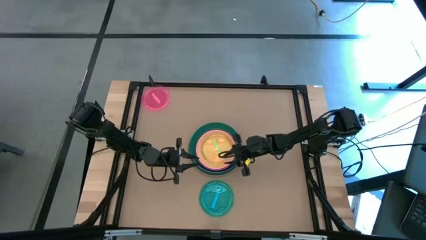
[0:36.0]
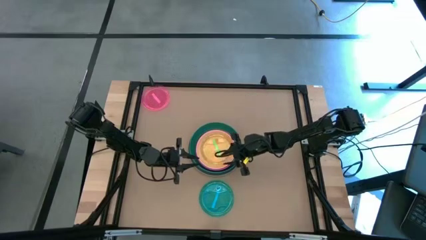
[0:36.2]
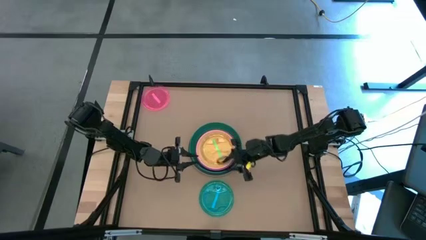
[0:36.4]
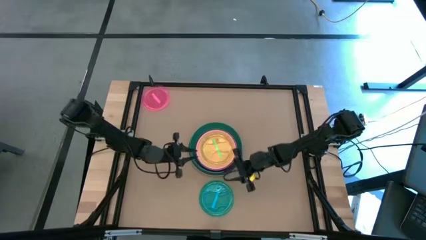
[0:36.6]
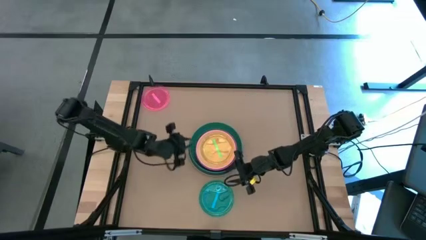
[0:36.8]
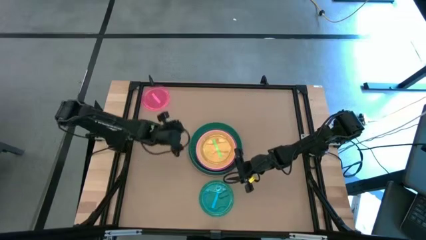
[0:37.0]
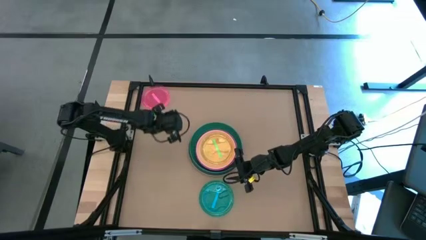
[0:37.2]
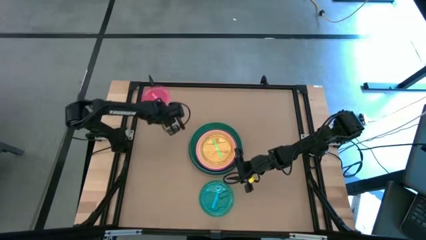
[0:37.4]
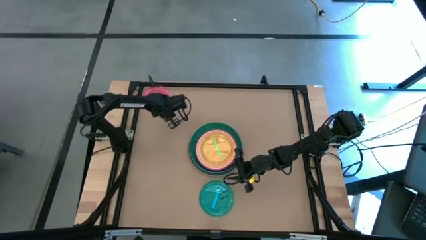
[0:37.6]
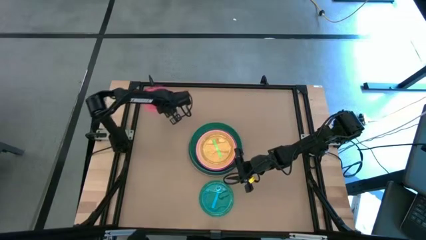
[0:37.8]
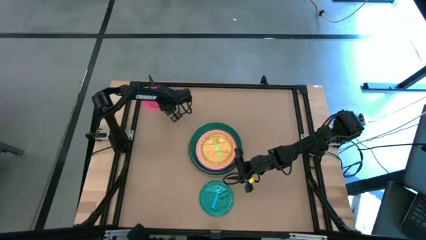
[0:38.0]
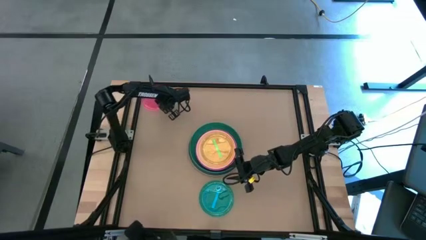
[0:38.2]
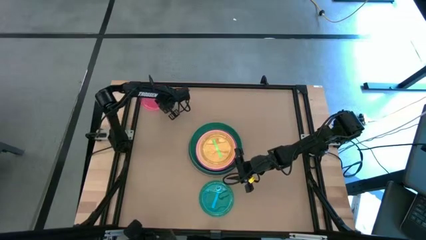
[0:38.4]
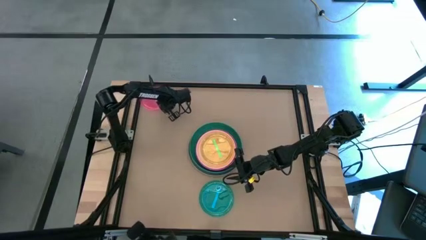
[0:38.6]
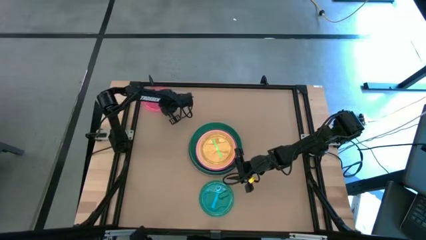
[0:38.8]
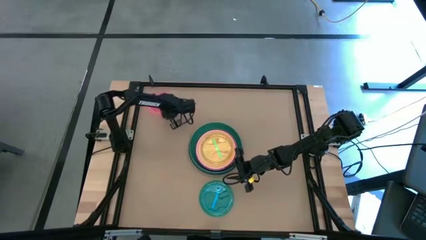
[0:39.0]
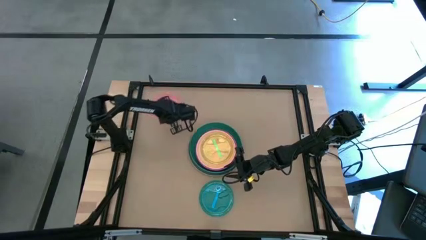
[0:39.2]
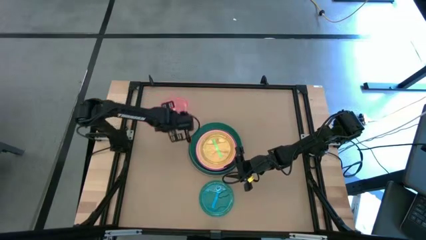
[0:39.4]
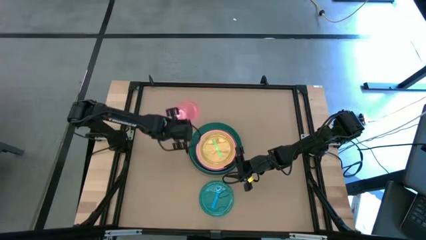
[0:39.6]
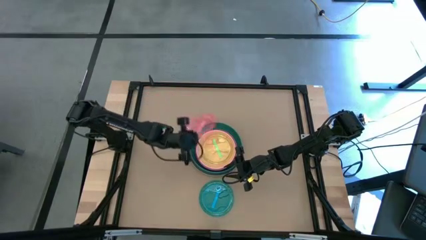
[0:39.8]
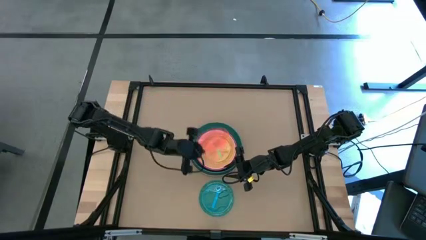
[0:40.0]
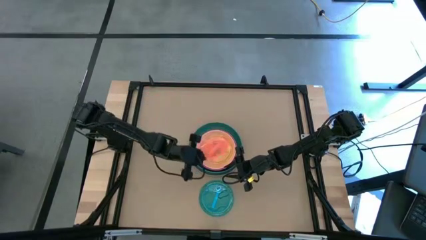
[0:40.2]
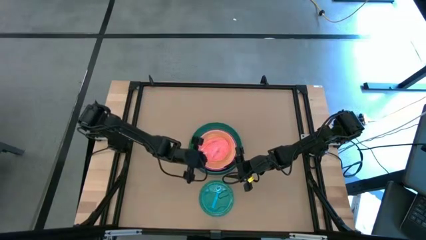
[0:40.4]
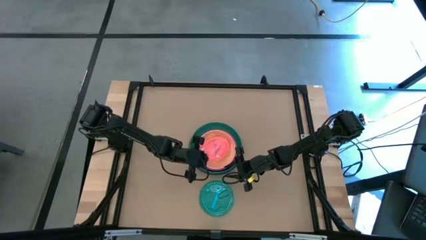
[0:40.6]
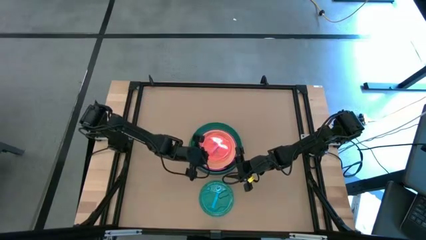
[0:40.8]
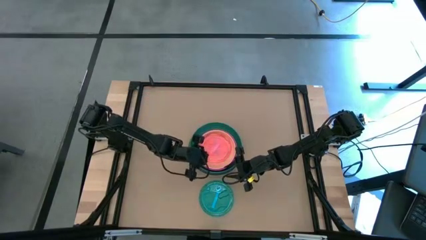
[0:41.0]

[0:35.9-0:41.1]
Task: Stack plastic plates
Stack the light pink plate on top of the green plate

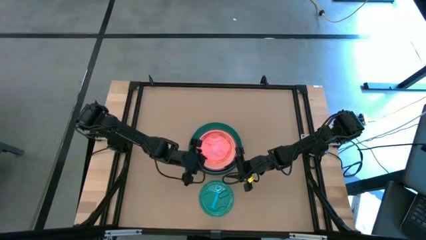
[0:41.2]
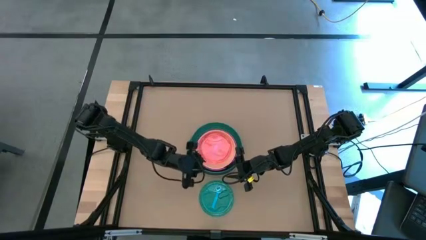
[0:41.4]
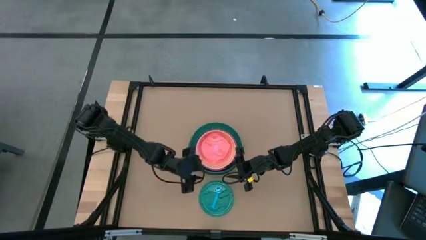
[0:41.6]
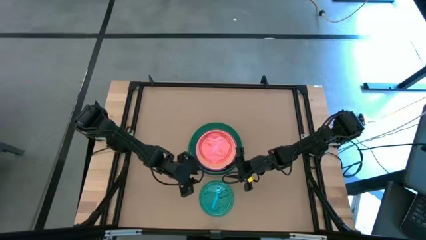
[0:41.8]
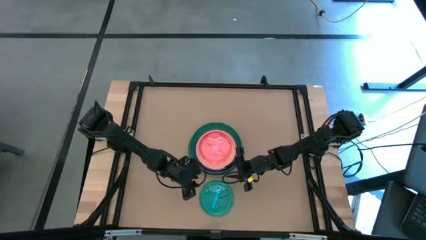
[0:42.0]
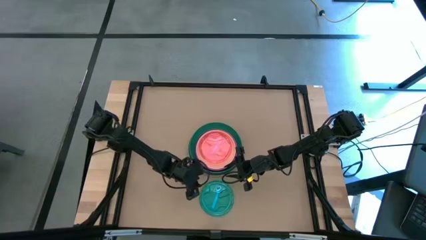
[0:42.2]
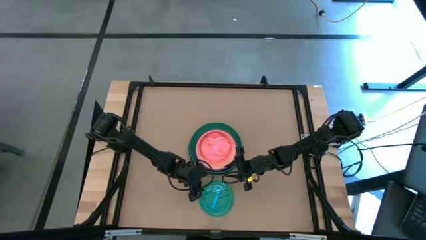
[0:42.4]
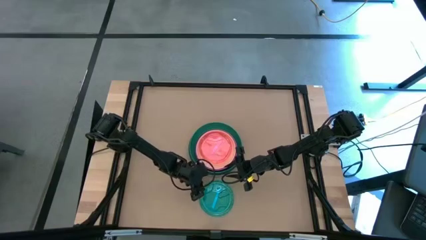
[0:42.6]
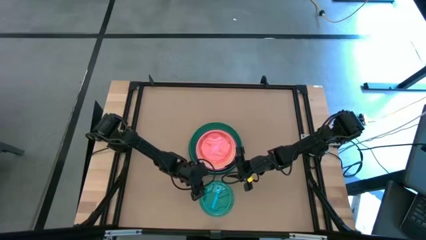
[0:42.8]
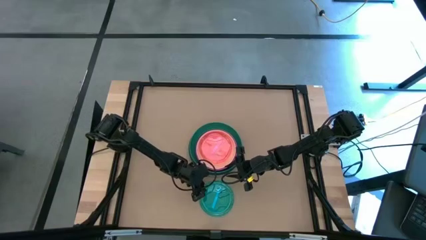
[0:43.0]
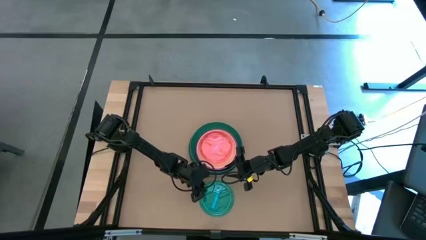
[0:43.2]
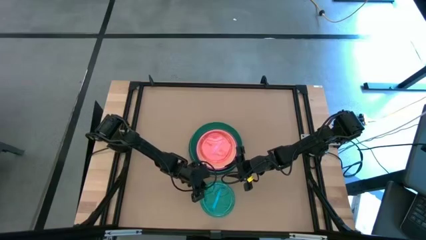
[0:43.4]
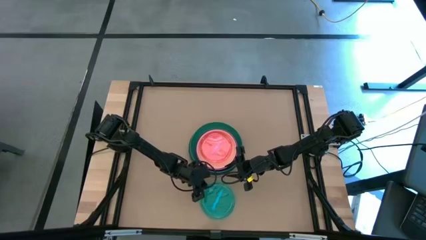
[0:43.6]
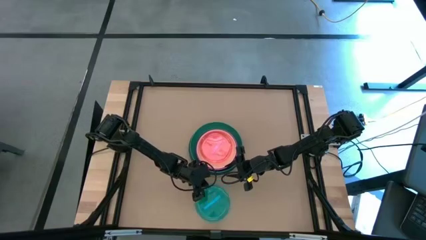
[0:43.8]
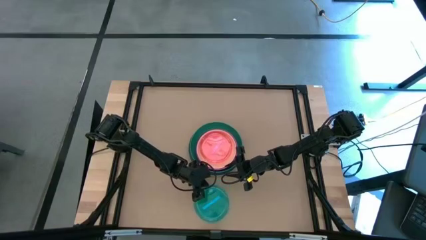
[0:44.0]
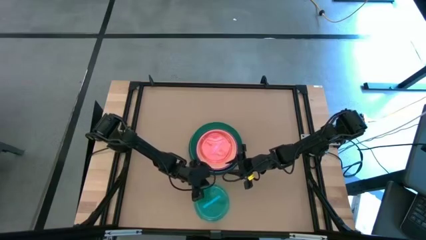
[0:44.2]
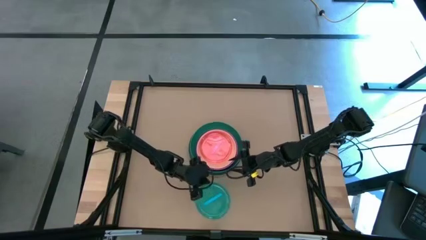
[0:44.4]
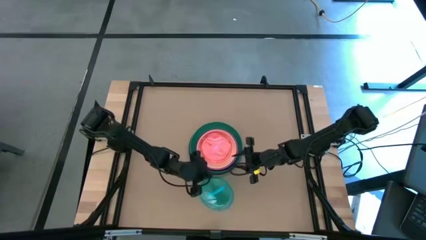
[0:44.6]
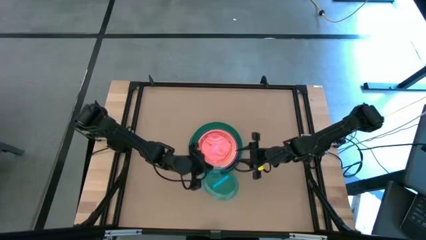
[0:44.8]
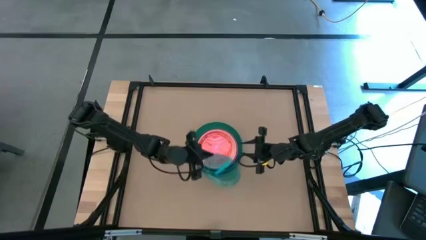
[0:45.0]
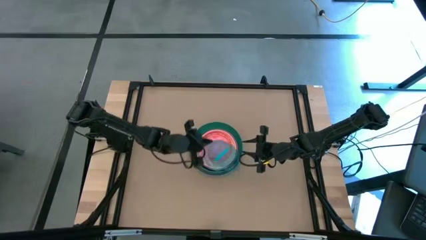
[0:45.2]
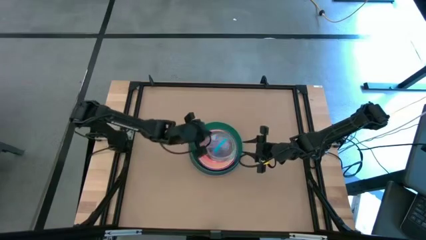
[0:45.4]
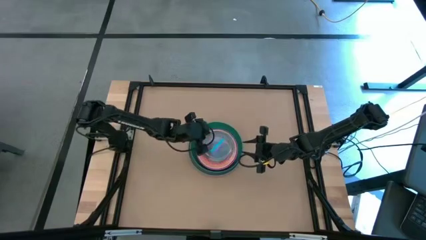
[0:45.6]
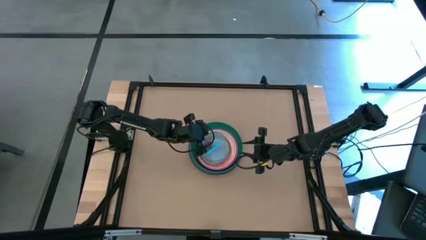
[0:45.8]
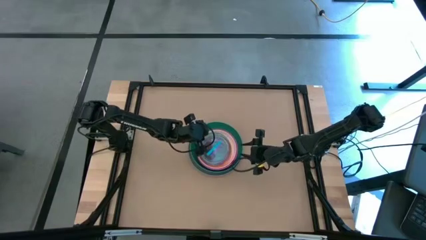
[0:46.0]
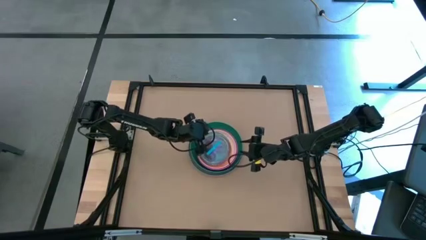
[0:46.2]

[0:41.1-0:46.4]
Stack the blue plate on top of the light pink plate

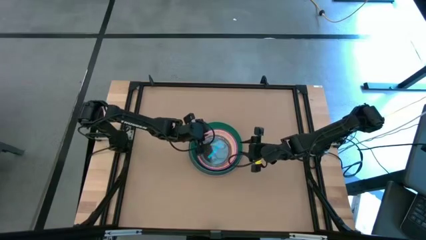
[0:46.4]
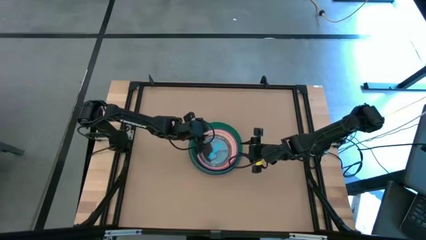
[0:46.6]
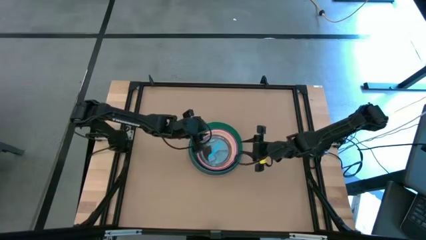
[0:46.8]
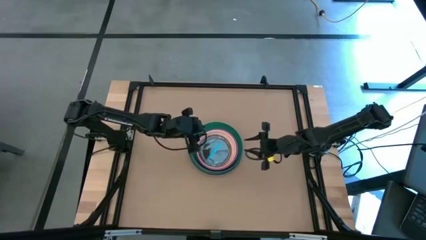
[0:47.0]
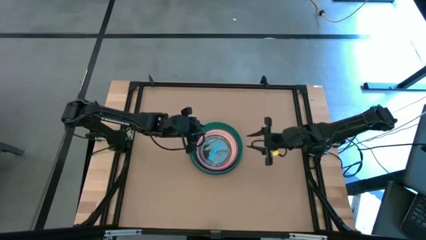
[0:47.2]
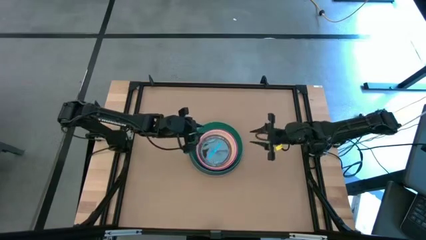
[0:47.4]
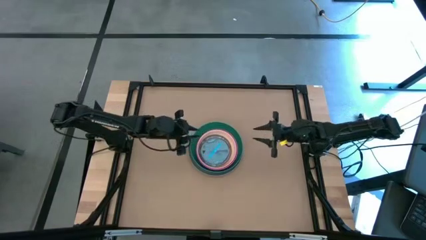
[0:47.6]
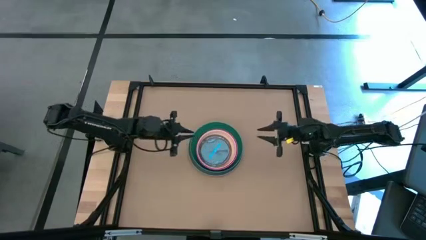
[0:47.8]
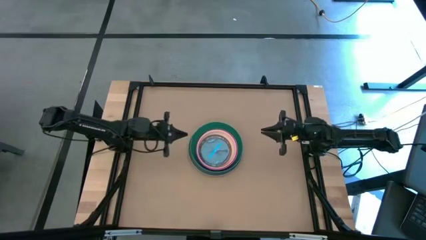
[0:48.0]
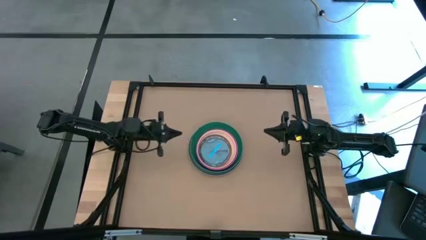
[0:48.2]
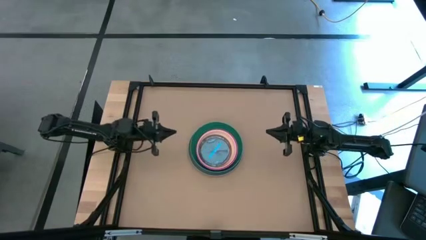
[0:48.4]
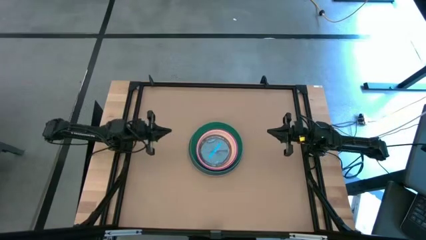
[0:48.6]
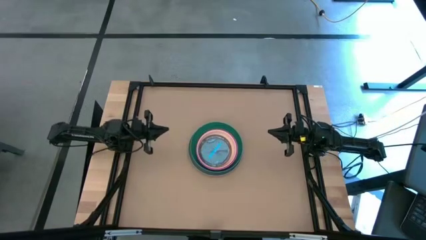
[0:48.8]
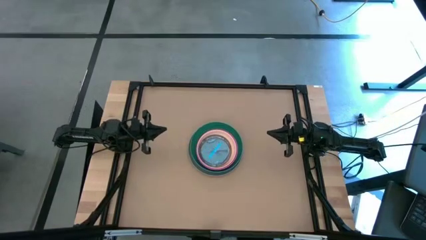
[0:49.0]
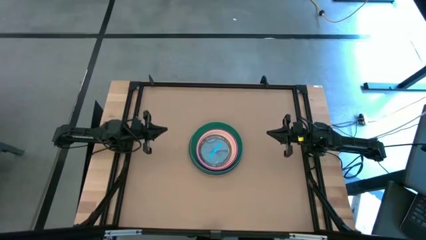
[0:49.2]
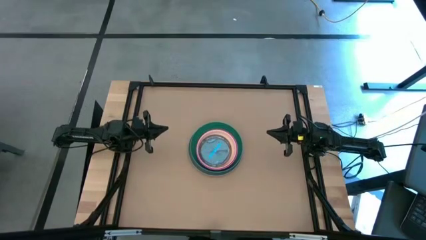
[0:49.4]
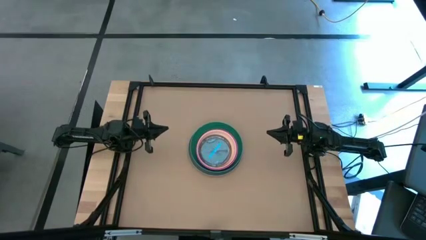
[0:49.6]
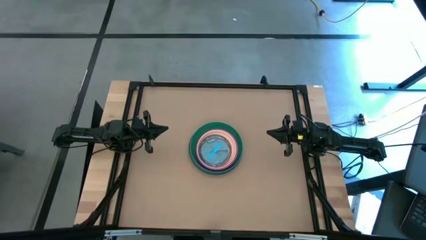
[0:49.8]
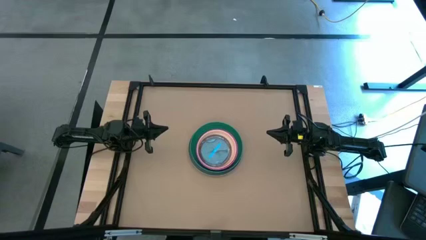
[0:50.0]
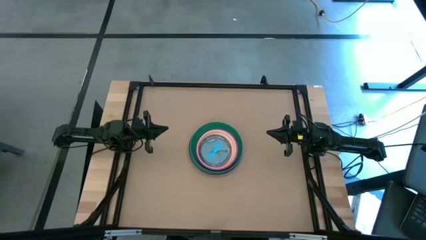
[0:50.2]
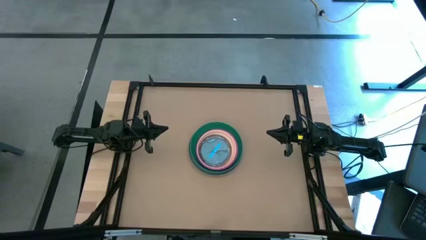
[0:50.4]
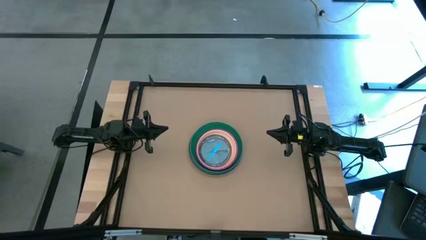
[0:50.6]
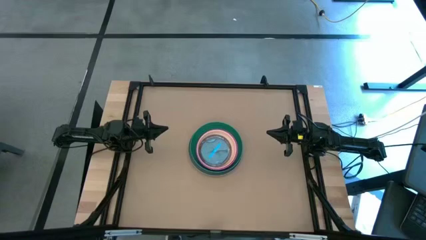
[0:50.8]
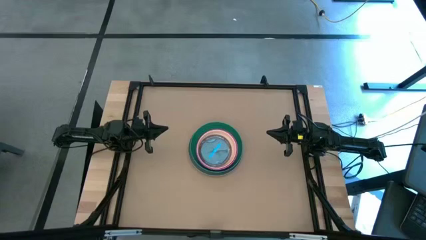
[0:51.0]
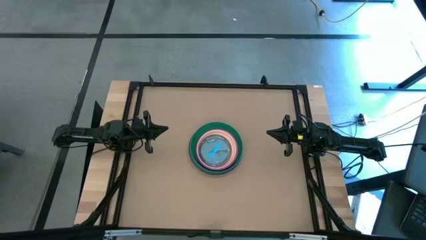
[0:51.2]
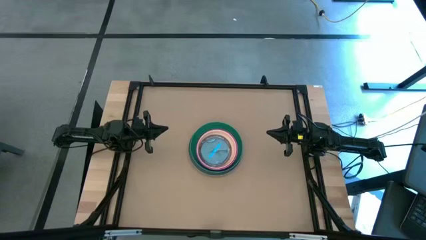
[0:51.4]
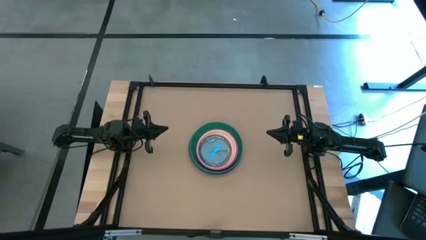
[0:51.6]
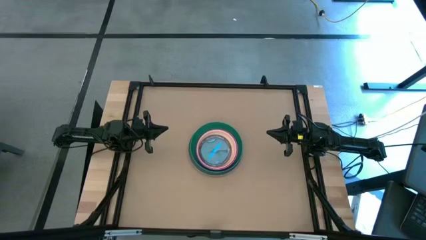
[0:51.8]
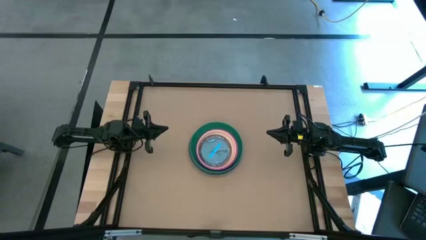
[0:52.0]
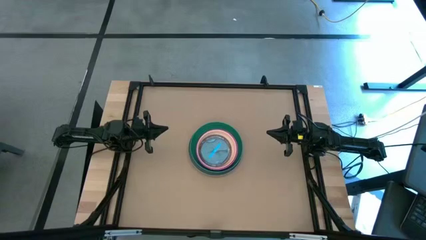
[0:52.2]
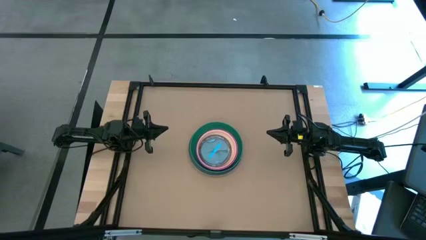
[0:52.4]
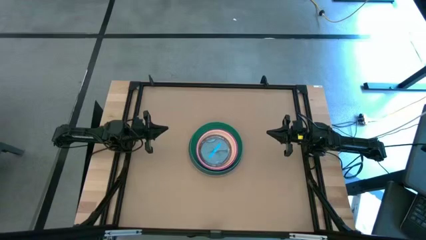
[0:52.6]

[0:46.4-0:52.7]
Return to Home Position
